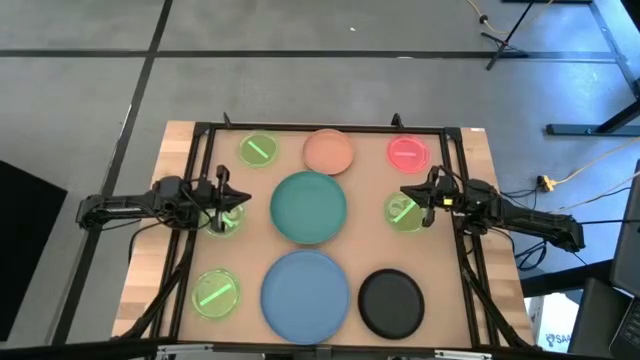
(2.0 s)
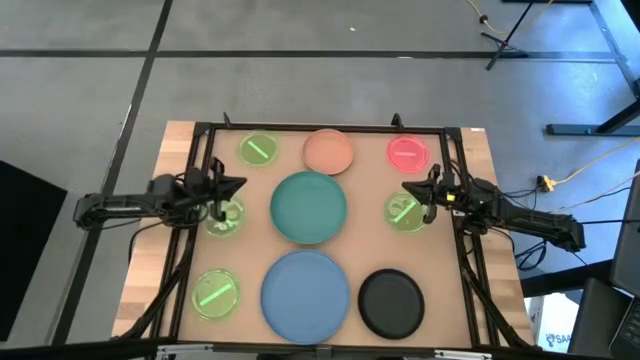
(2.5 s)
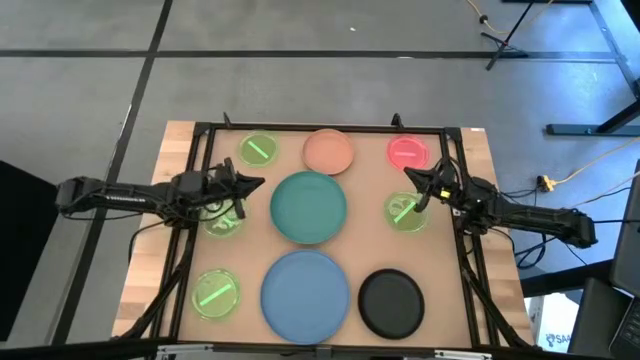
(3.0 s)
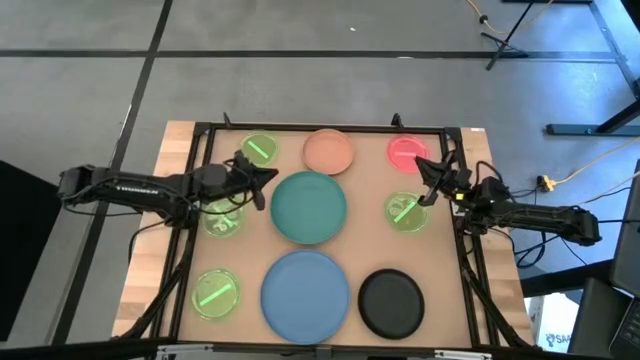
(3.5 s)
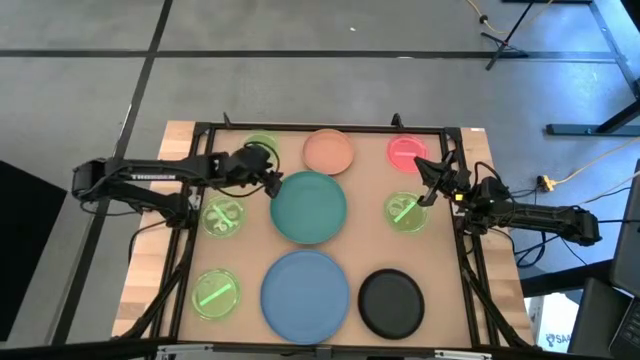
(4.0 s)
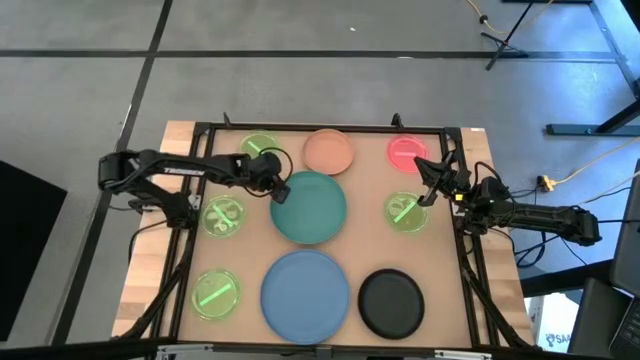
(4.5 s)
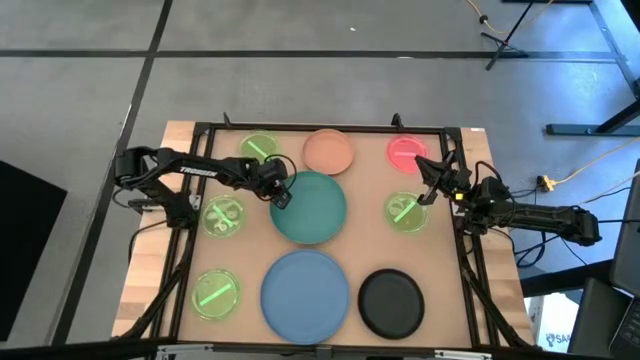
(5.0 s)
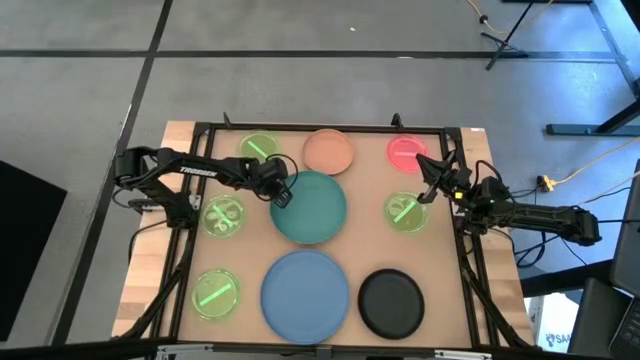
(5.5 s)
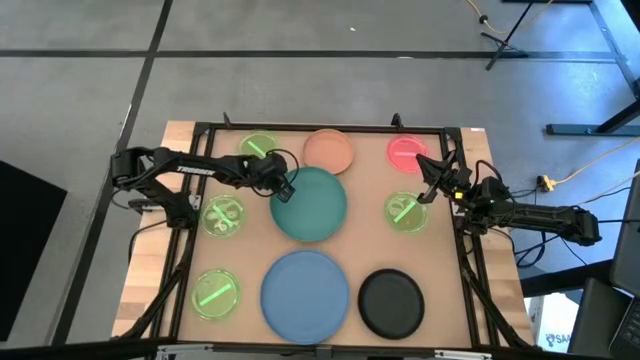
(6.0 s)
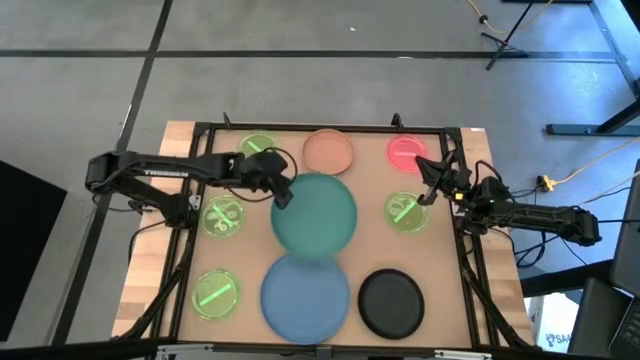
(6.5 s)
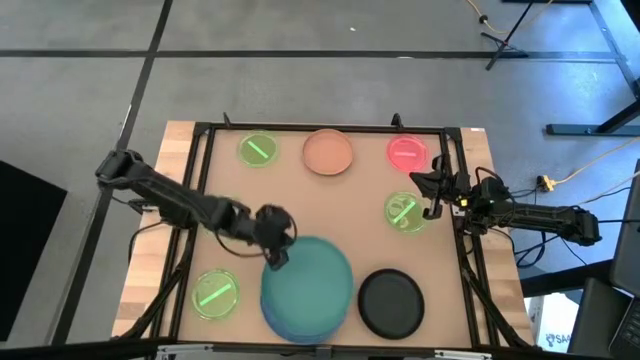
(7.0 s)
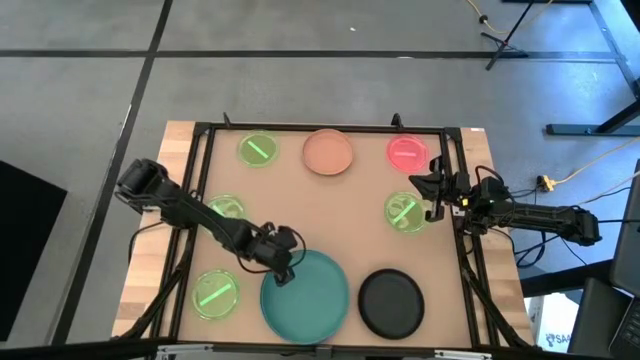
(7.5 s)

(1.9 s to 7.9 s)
Task: Stack plastic plates
Stack the green plate on the blue plate

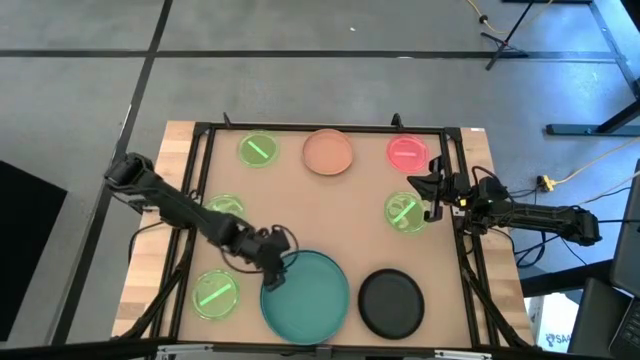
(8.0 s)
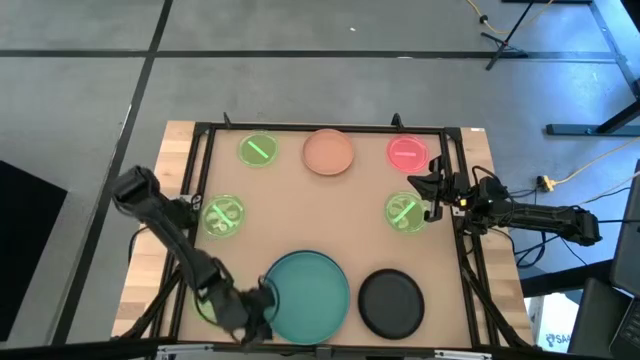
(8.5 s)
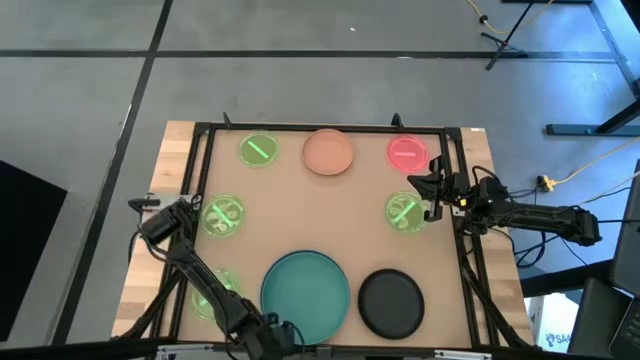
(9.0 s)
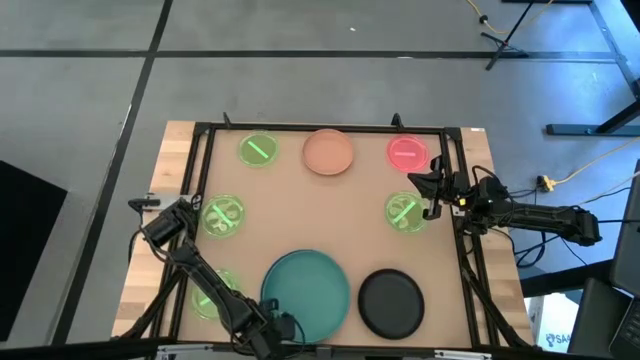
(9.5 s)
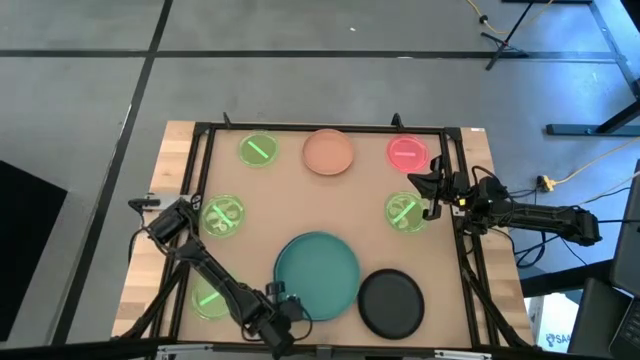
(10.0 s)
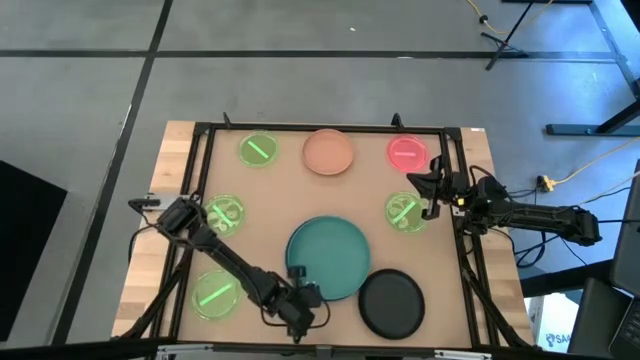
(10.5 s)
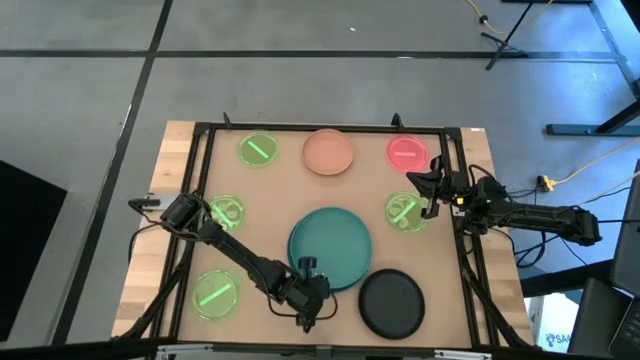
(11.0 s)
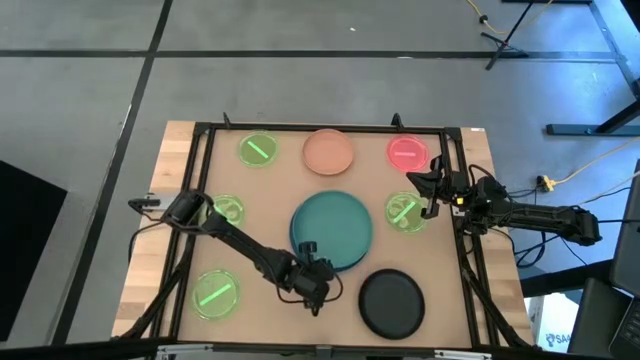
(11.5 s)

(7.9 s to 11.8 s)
Move the stacked plates to the center of the table

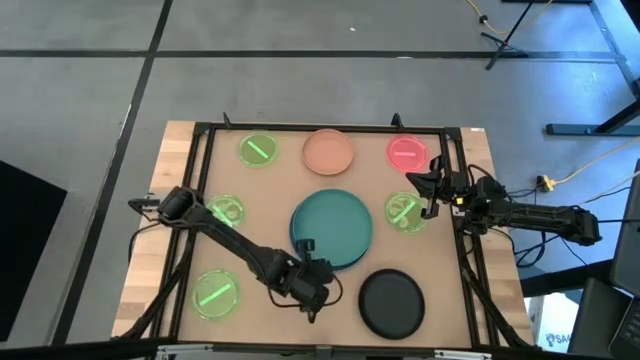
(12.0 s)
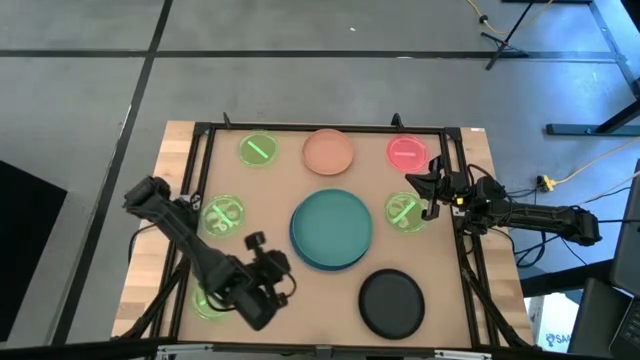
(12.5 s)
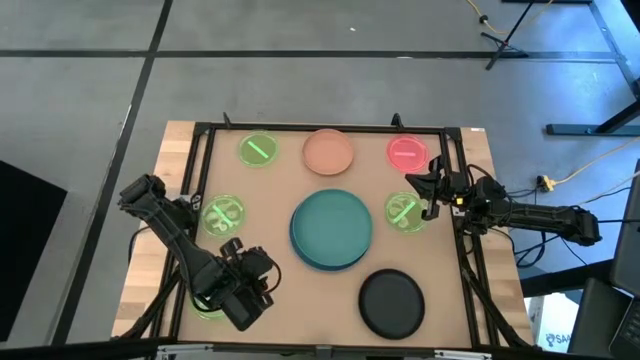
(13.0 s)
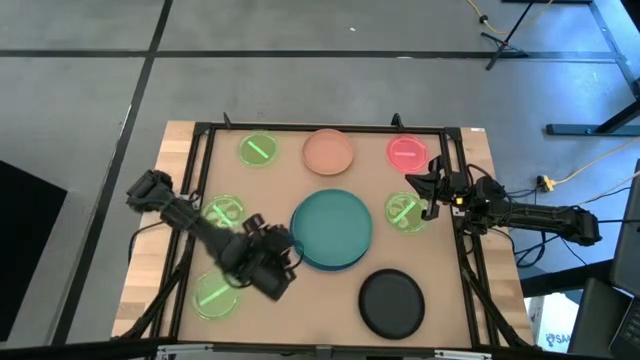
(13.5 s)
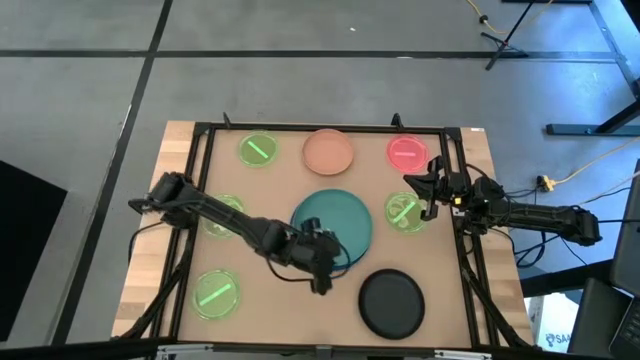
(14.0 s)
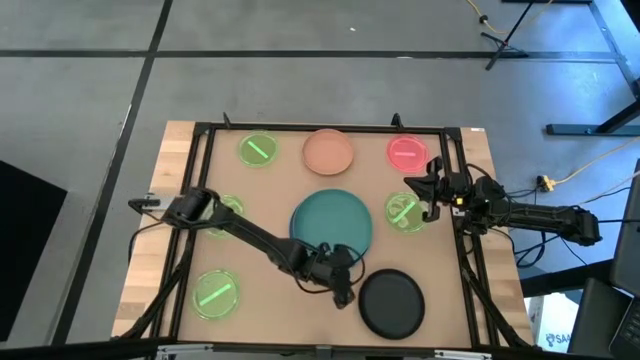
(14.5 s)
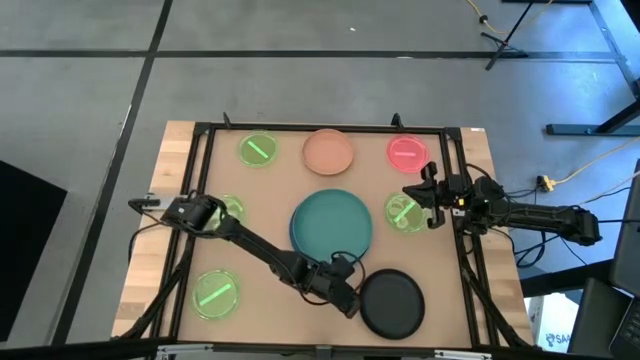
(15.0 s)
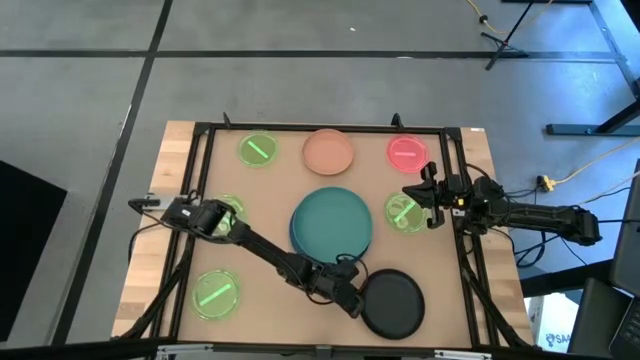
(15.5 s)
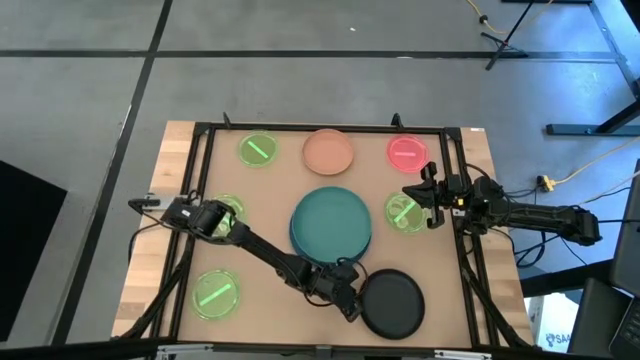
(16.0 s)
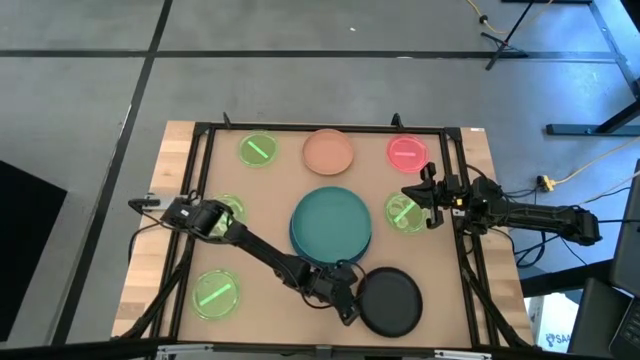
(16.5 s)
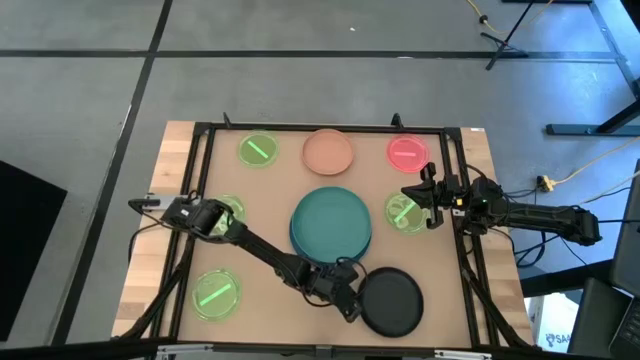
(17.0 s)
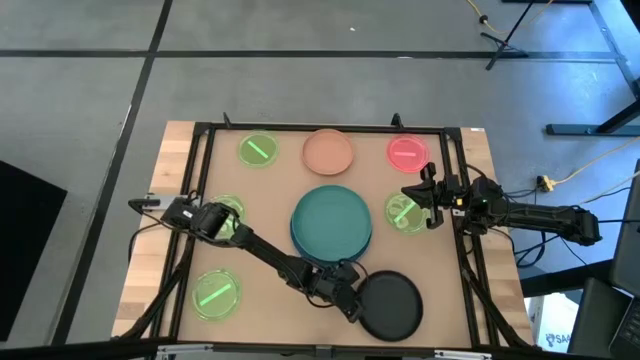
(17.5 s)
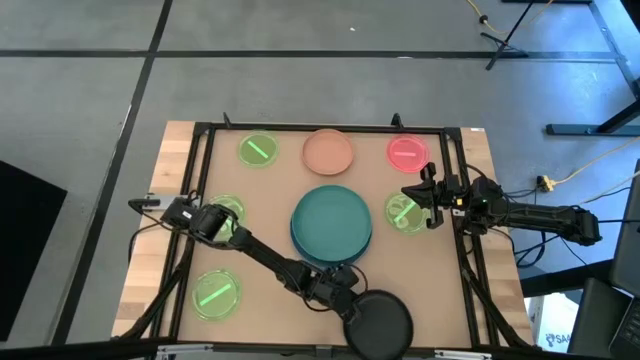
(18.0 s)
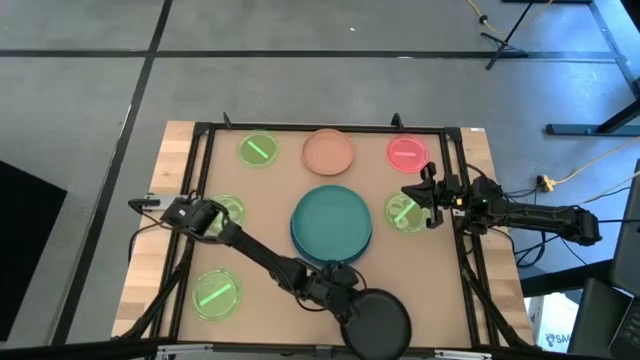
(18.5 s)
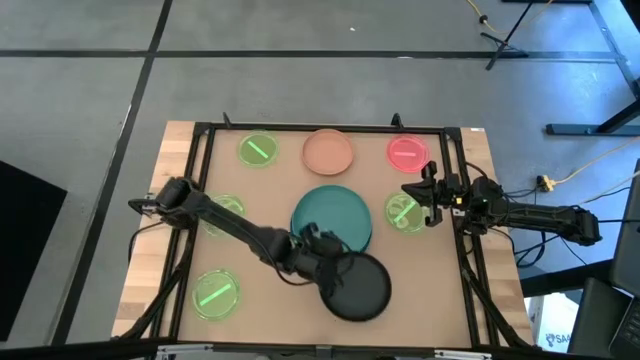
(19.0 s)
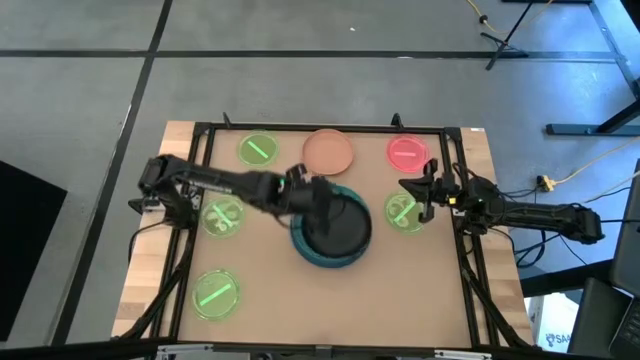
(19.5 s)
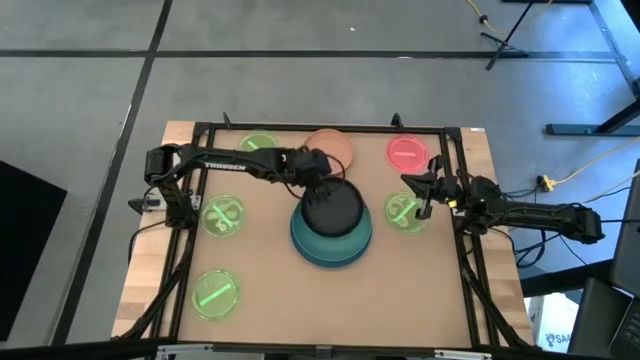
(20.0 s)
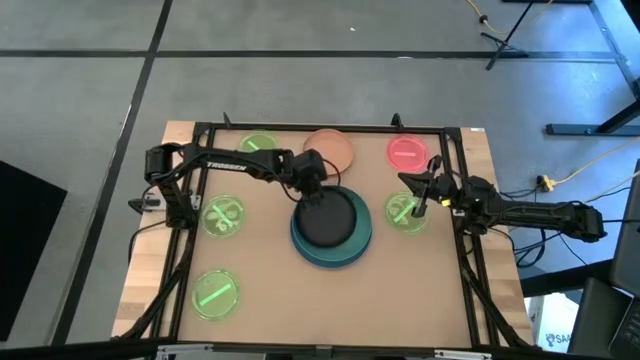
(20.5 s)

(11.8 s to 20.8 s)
Stack the black plate on the green plate

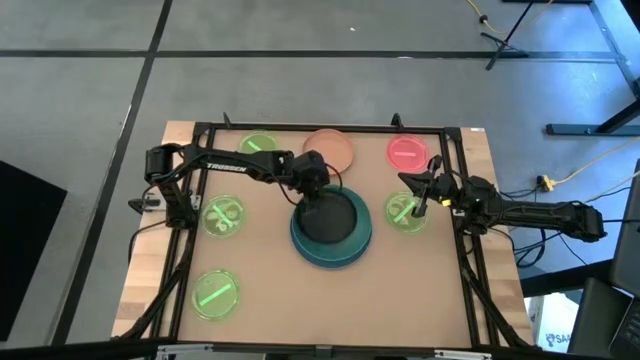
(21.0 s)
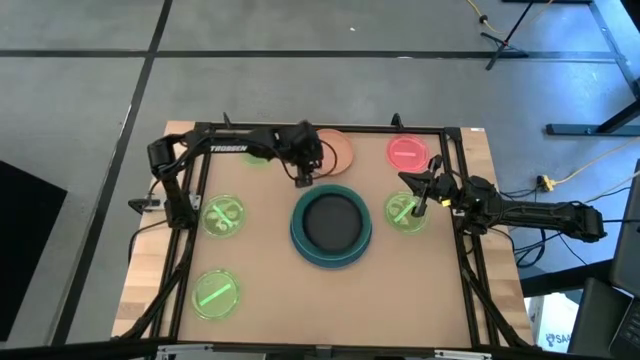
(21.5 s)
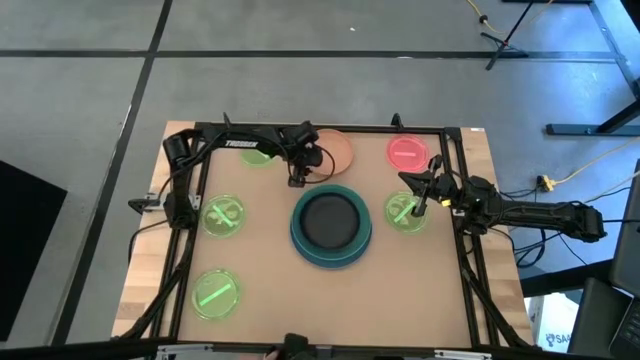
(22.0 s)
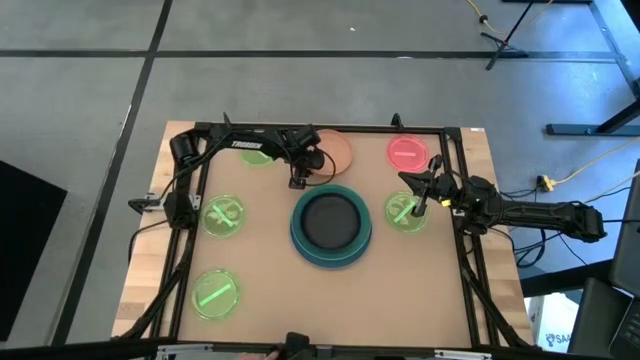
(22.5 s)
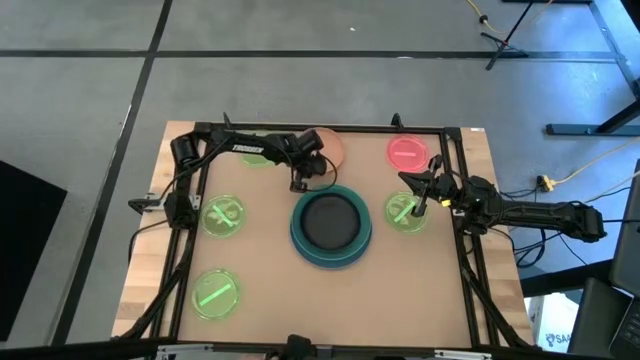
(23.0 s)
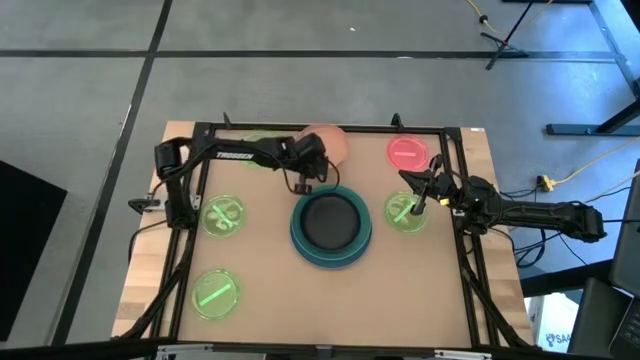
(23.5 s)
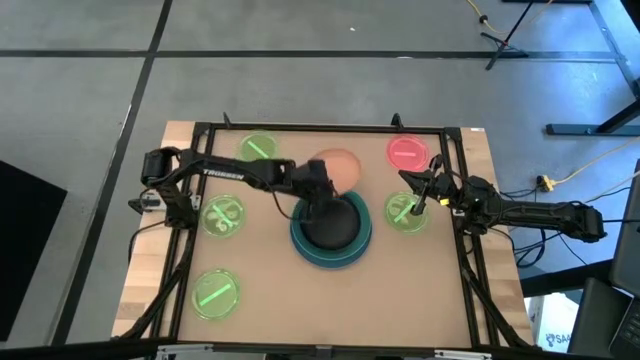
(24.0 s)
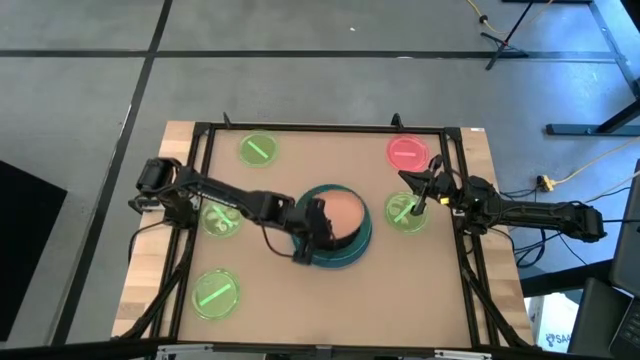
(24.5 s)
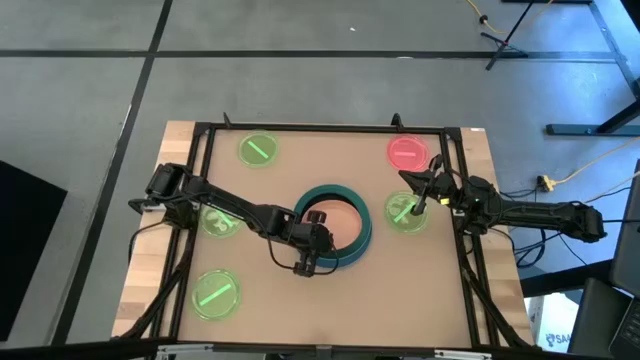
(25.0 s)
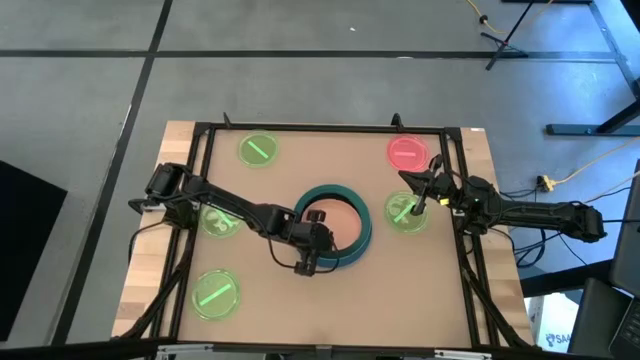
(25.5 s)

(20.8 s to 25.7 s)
Stack the orange plate on the black plate
